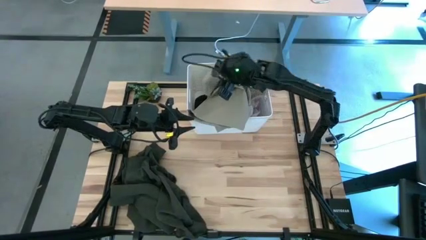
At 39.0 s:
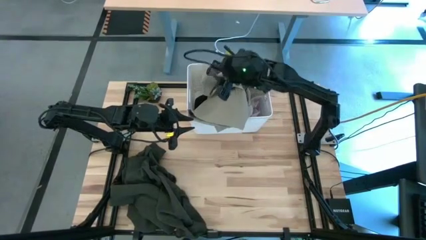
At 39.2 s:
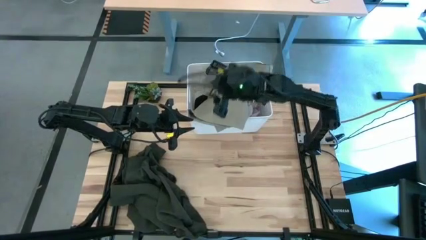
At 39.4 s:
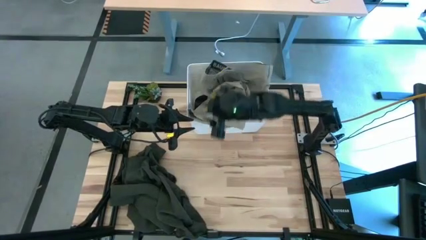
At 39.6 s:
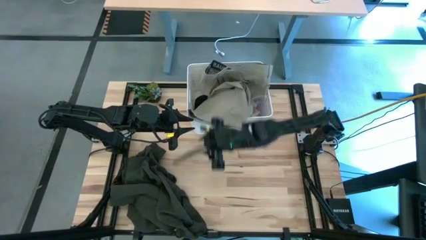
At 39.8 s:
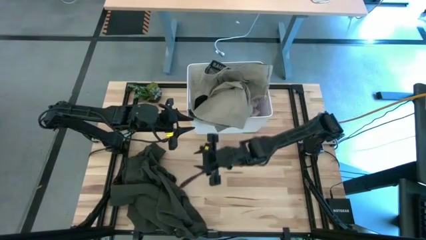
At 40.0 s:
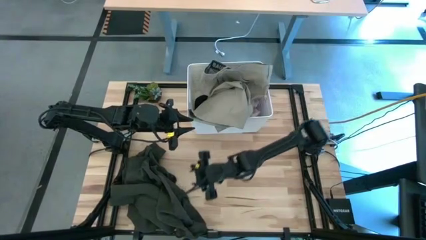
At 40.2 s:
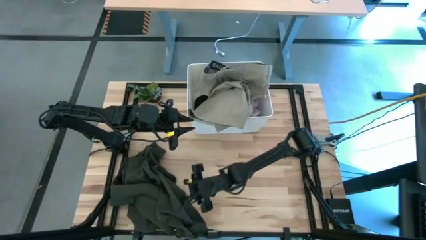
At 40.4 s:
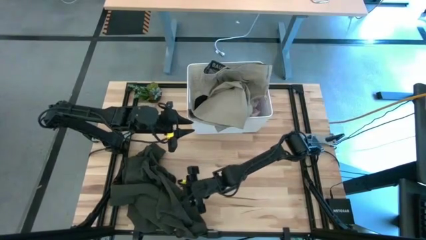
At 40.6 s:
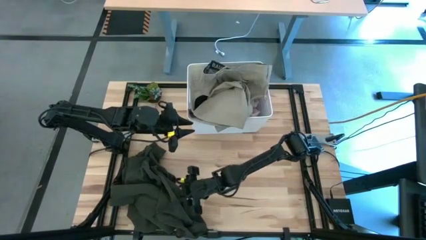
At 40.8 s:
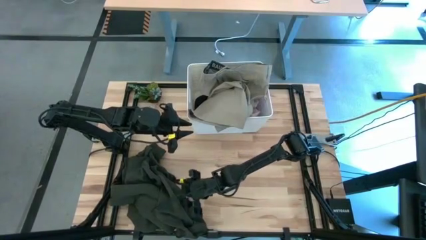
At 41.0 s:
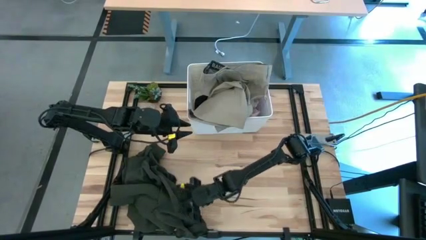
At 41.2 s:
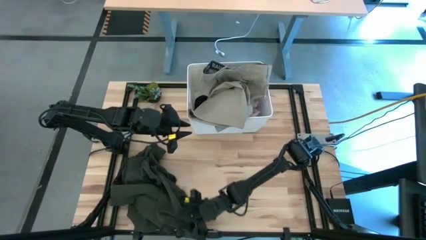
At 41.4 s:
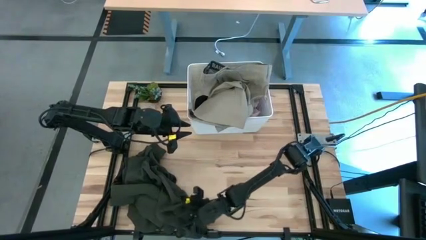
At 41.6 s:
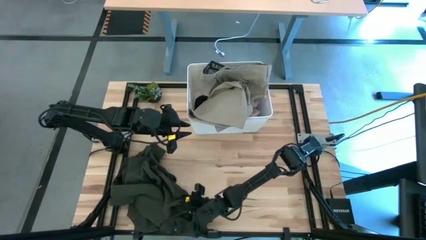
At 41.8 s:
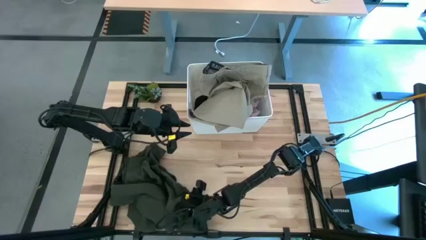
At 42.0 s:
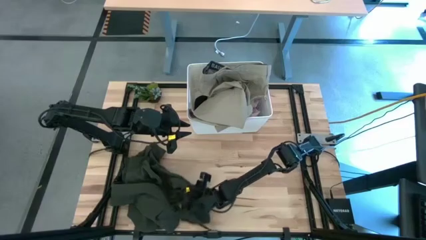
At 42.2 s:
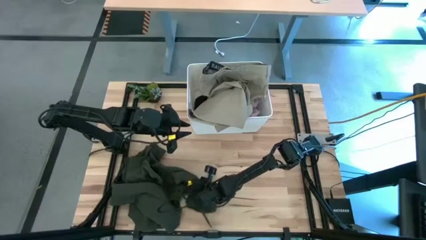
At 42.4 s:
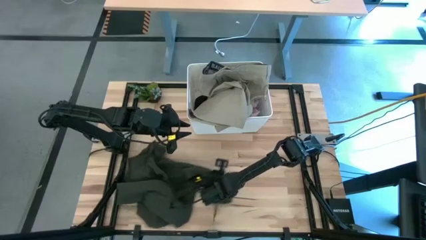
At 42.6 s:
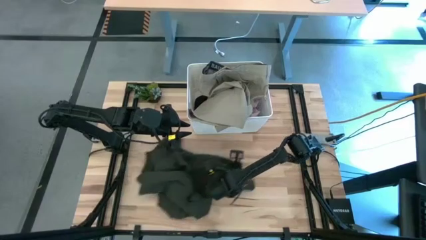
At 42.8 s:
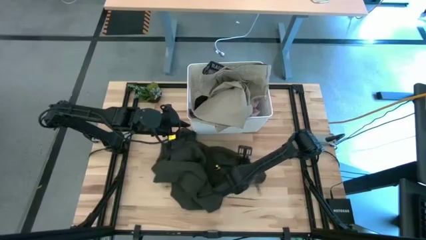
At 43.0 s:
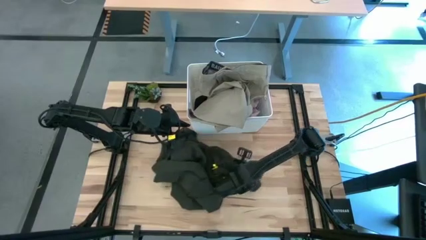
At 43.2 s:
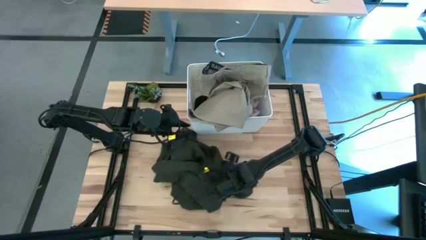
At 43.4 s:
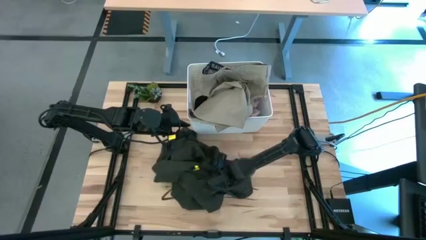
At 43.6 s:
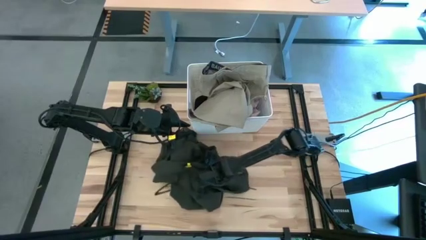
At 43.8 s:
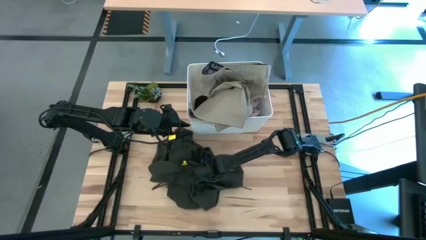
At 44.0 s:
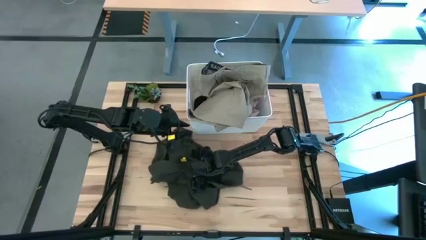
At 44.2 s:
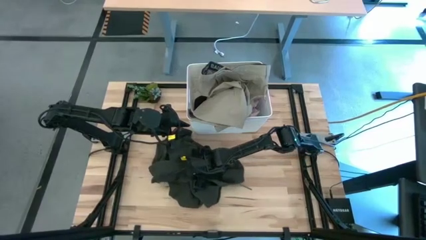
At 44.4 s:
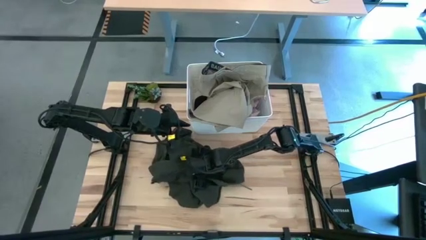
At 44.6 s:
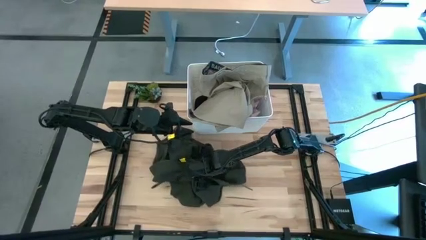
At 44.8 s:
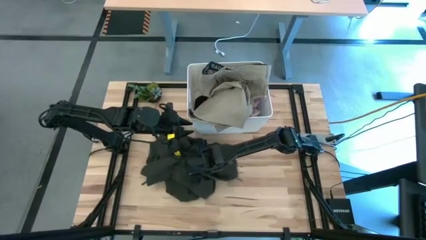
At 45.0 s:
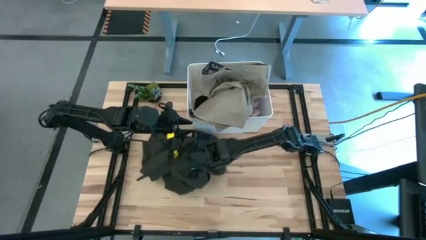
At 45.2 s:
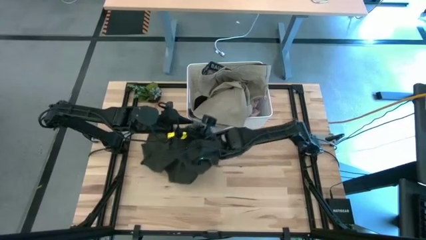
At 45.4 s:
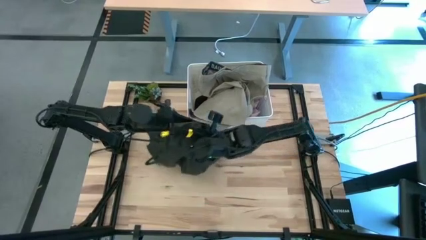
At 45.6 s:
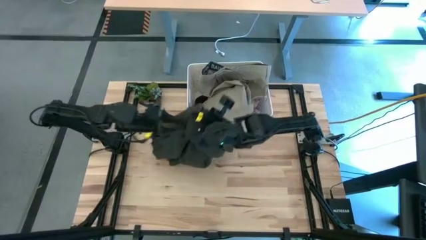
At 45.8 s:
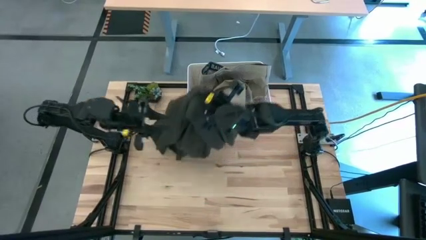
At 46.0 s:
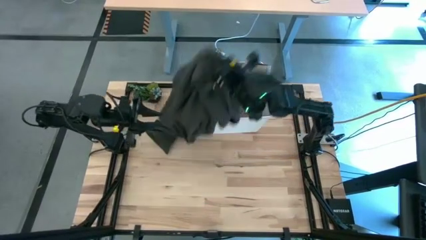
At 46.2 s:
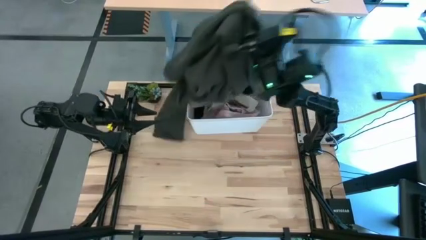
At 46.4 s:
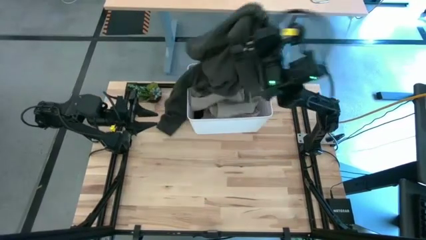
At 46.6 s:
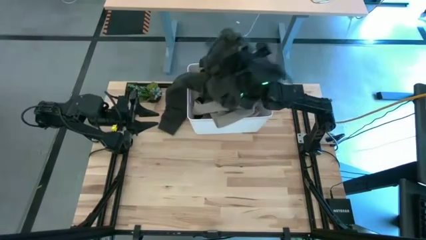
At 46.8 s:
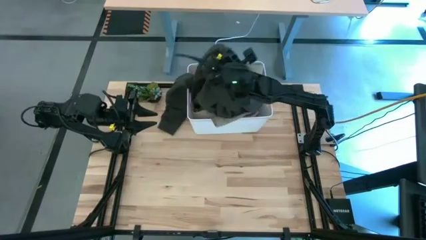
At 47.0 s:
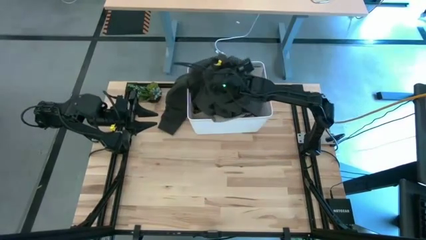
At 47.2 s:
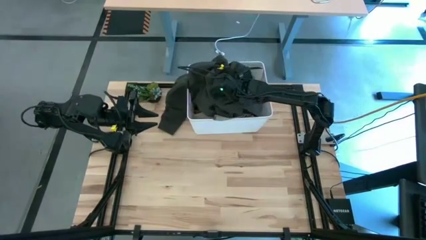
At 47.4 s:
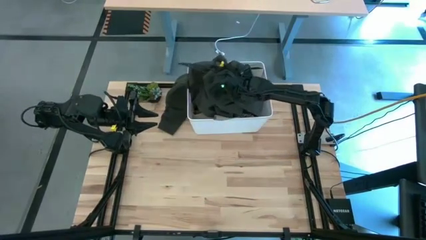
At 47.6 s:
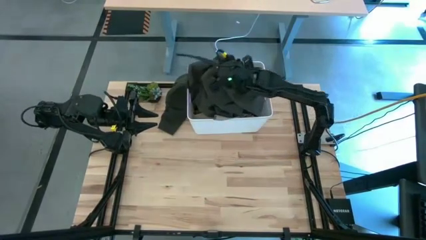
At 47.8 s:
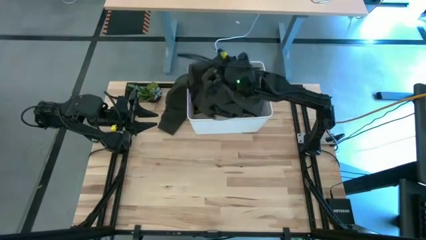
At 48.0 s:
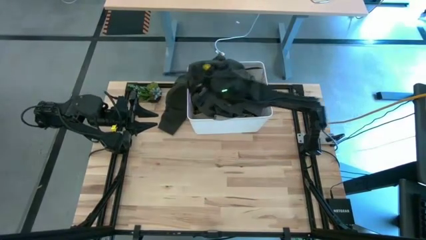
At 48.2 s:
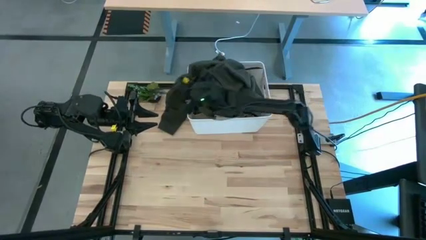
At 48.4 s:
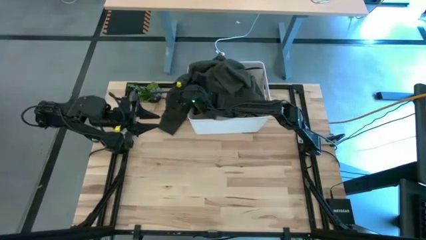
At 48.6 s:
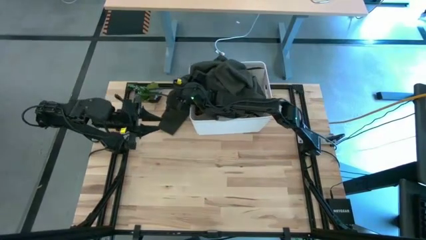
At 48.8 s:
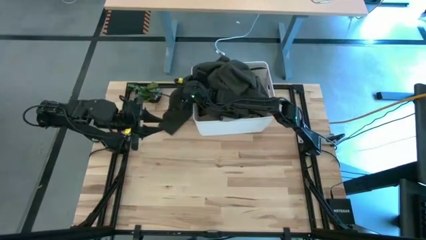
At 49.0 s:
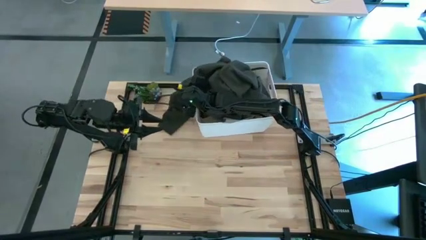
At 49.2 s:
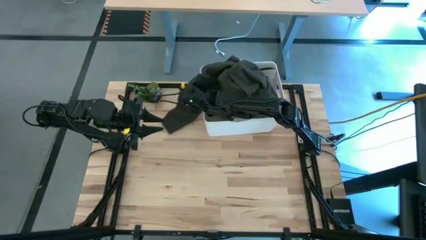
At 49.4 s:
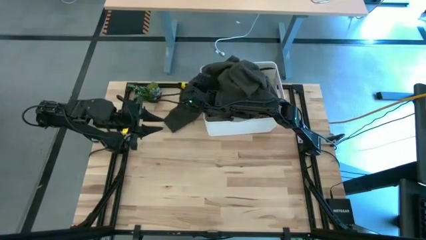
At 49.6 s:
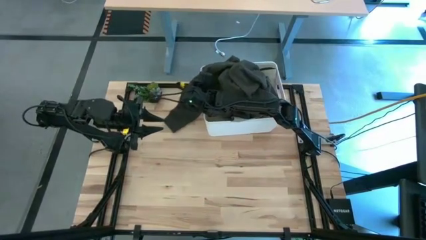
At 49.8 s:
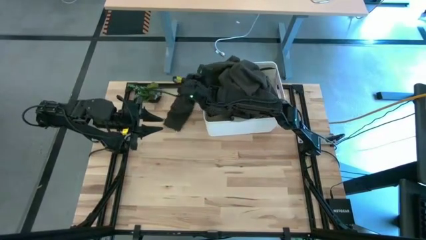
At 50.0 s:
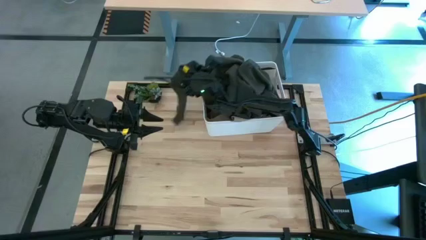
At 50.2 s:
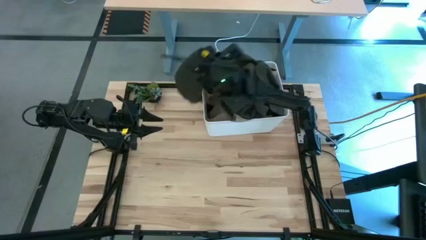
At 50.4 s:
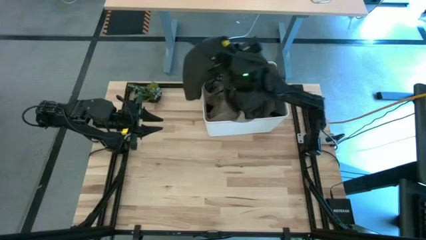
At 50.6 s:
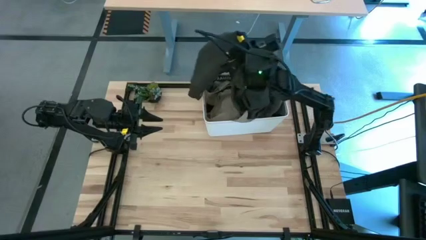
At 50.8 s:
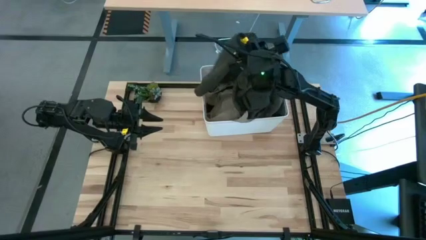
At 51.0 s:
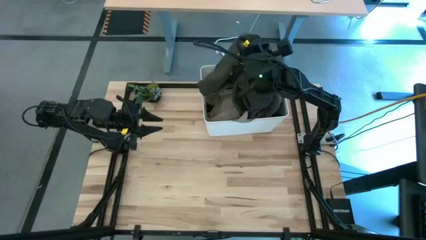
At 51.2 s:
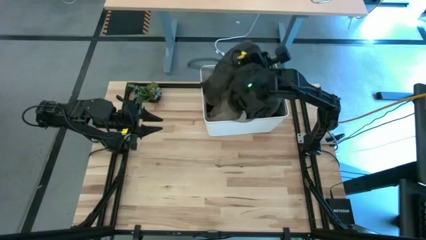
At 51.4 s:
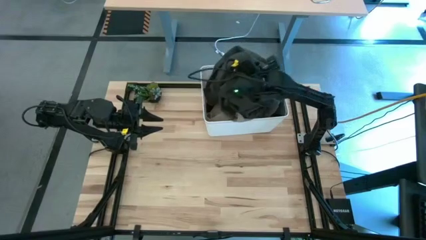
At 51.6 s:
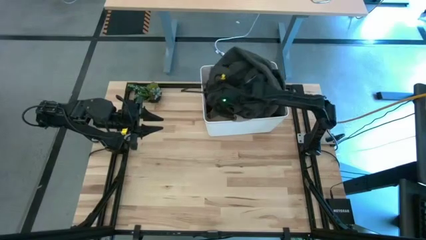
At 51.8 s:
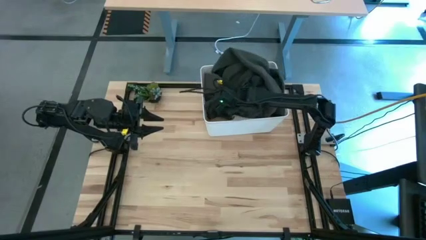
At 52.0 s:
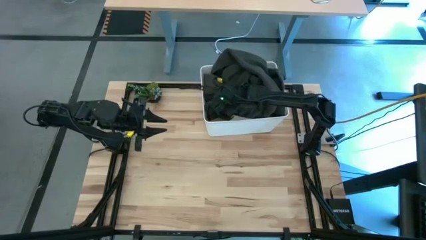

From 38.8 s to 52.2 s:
Task: Sort clothes
Put the black sweater into the white laundry bin
